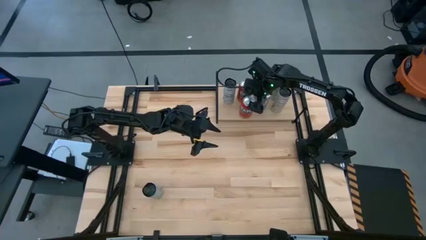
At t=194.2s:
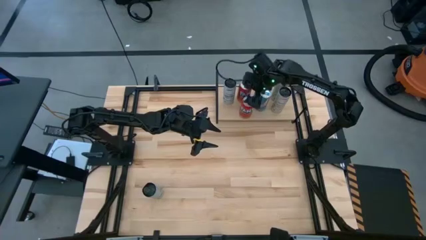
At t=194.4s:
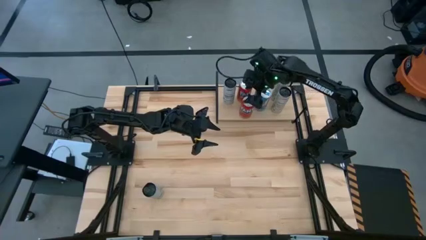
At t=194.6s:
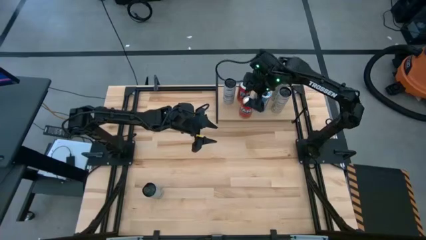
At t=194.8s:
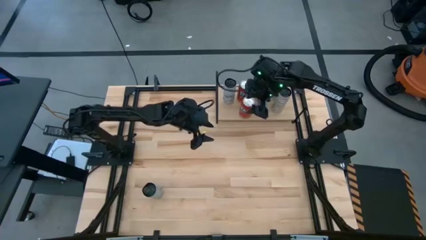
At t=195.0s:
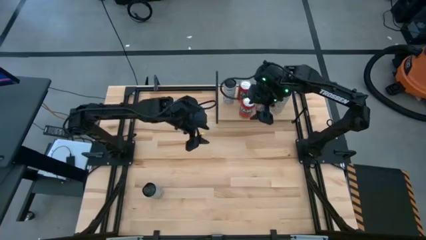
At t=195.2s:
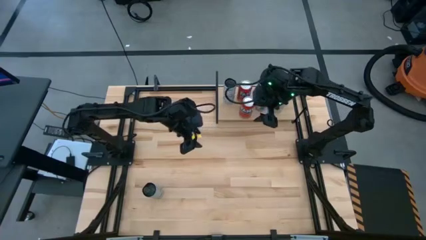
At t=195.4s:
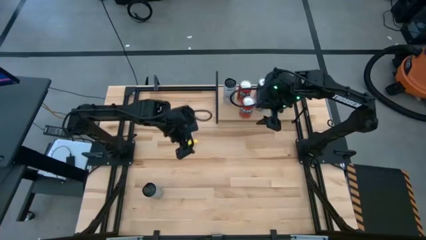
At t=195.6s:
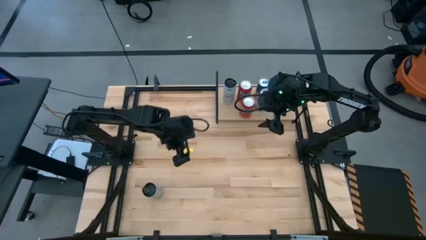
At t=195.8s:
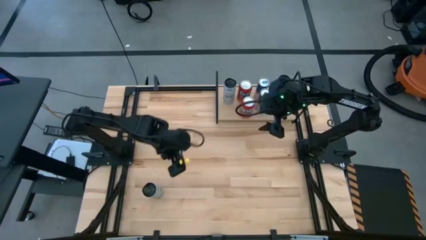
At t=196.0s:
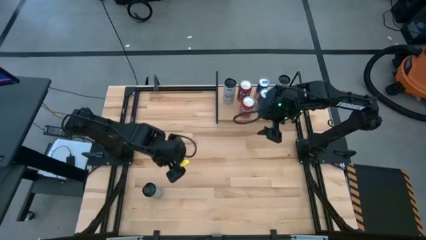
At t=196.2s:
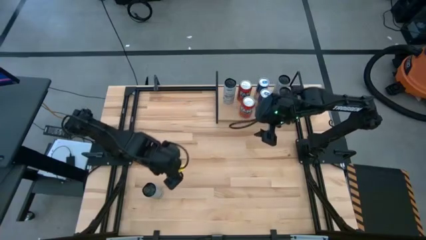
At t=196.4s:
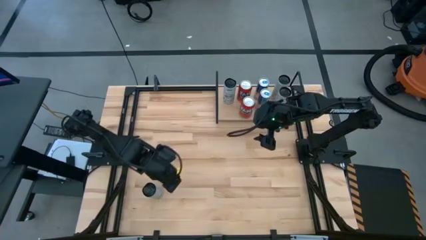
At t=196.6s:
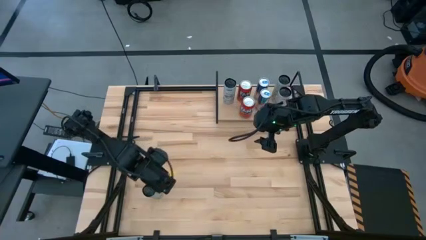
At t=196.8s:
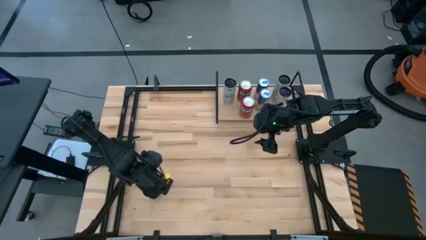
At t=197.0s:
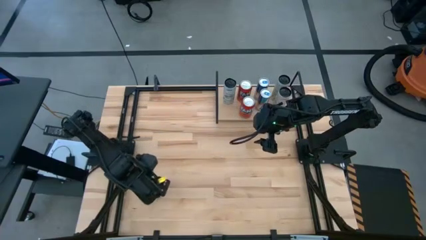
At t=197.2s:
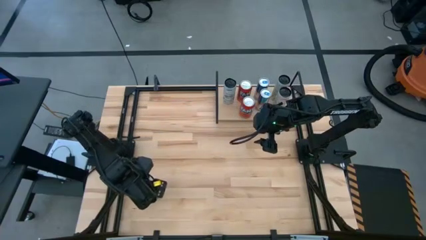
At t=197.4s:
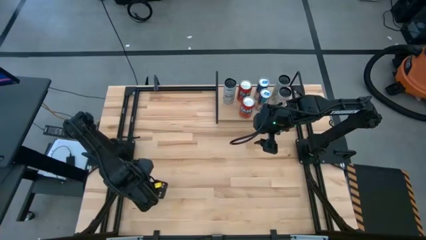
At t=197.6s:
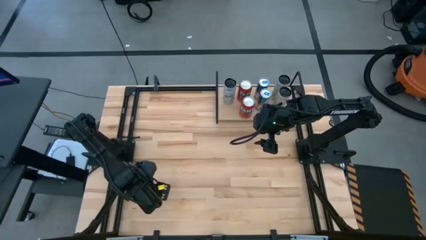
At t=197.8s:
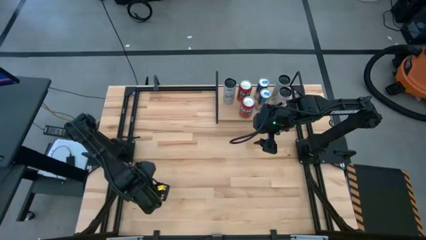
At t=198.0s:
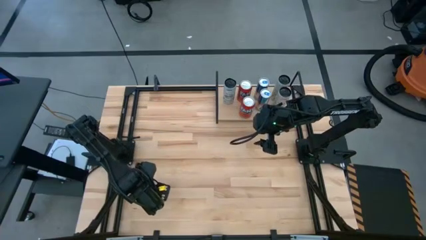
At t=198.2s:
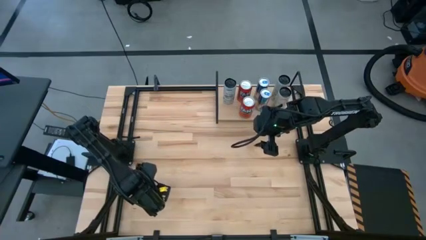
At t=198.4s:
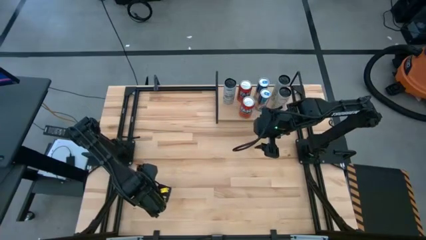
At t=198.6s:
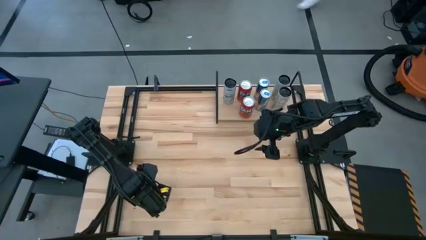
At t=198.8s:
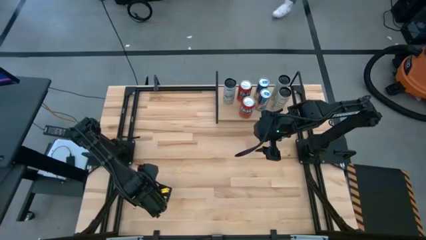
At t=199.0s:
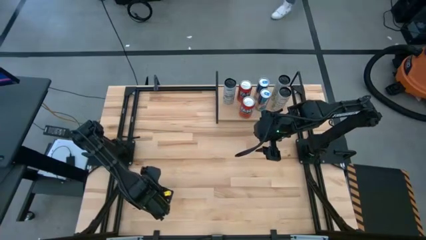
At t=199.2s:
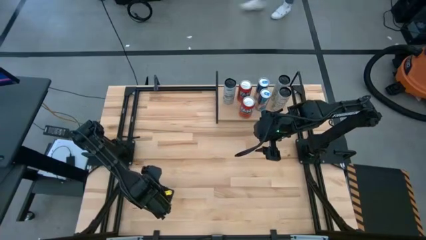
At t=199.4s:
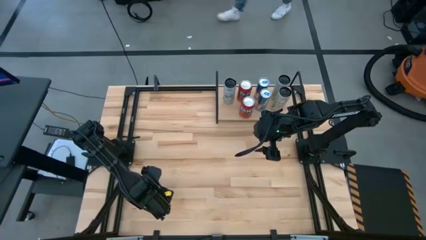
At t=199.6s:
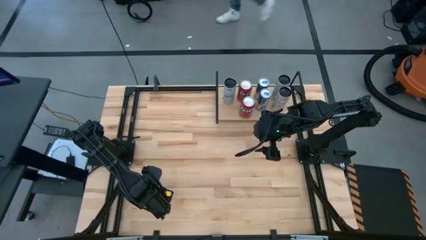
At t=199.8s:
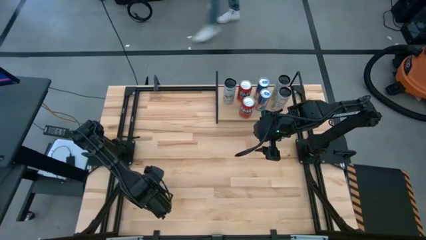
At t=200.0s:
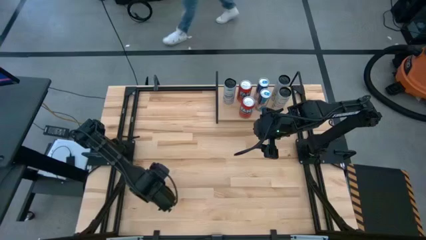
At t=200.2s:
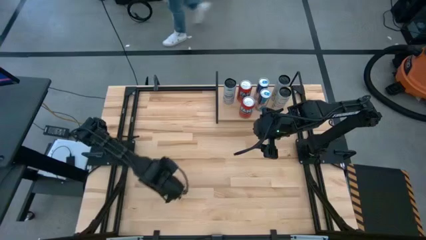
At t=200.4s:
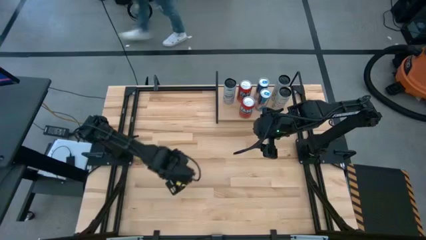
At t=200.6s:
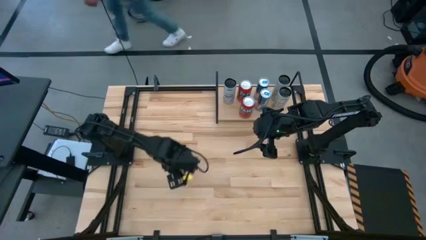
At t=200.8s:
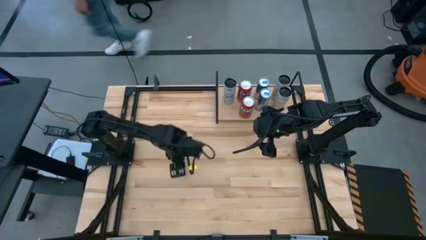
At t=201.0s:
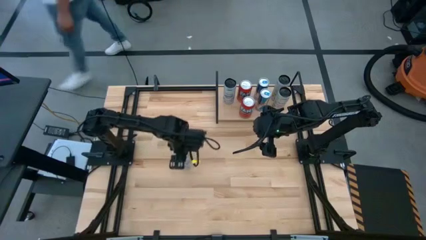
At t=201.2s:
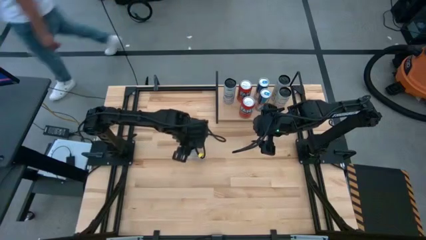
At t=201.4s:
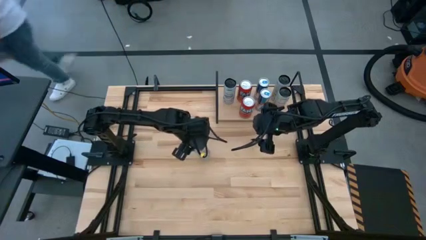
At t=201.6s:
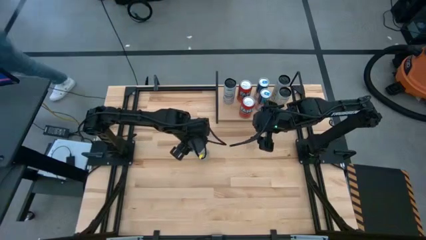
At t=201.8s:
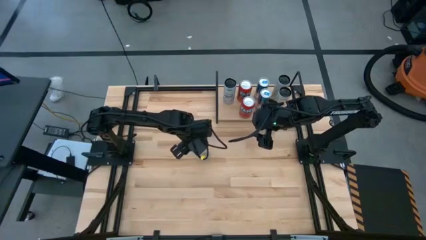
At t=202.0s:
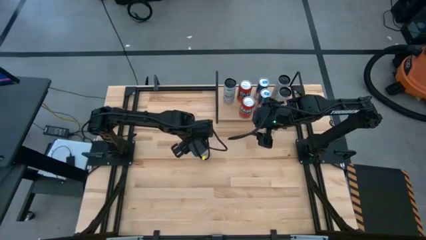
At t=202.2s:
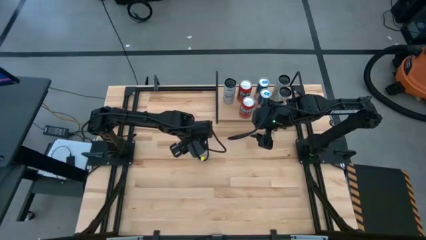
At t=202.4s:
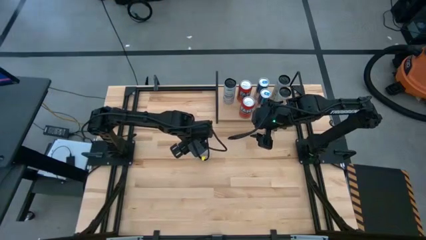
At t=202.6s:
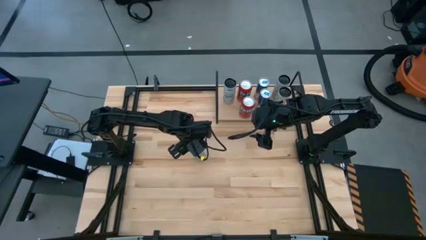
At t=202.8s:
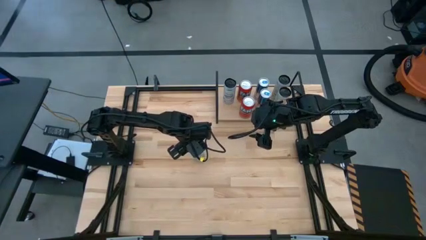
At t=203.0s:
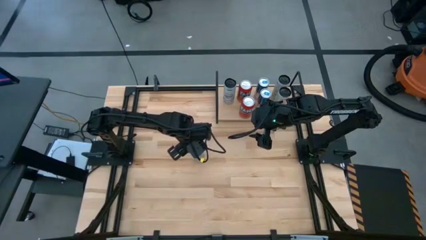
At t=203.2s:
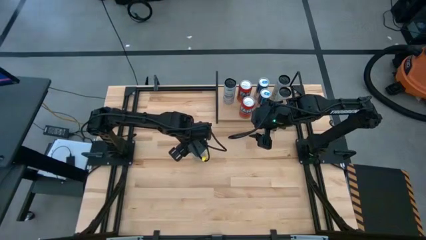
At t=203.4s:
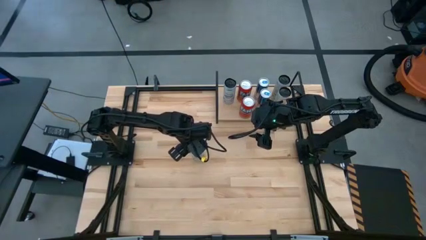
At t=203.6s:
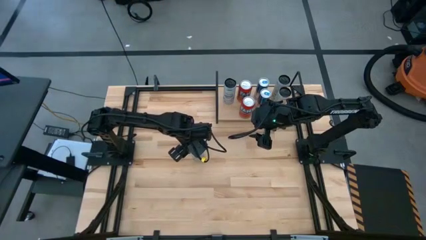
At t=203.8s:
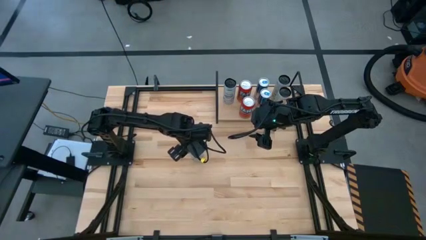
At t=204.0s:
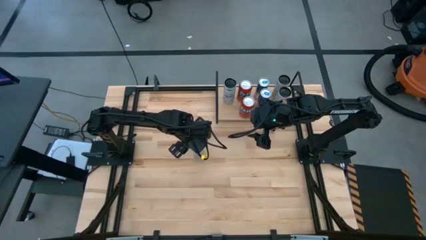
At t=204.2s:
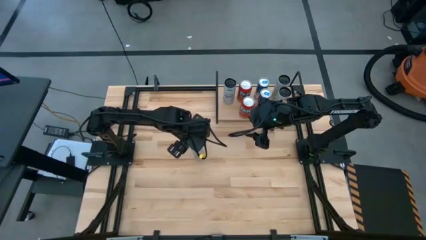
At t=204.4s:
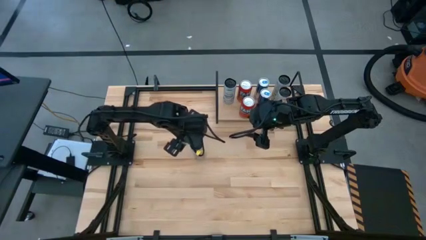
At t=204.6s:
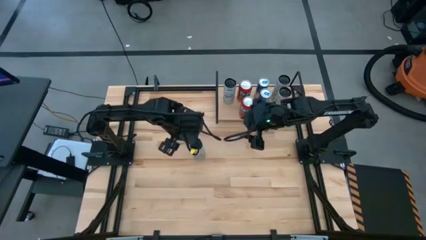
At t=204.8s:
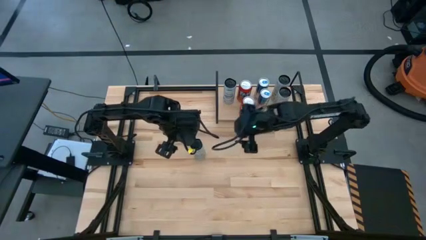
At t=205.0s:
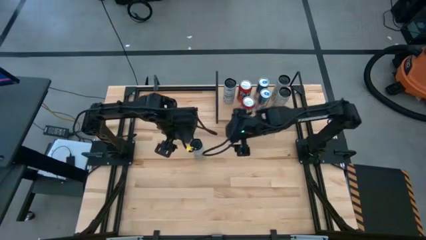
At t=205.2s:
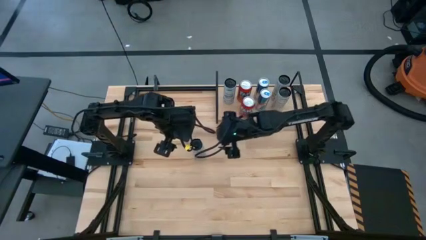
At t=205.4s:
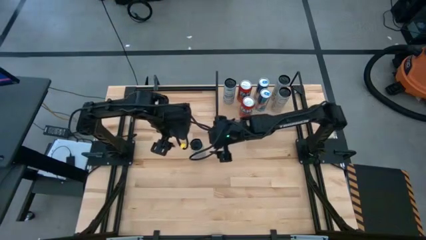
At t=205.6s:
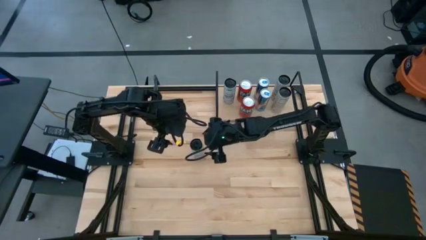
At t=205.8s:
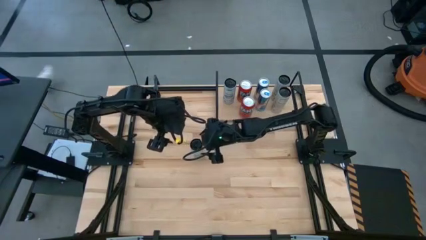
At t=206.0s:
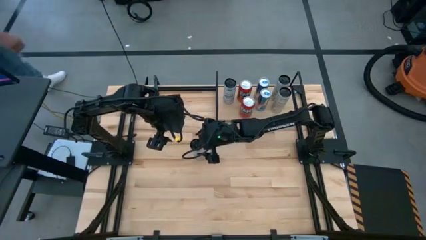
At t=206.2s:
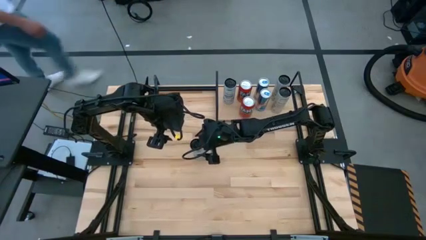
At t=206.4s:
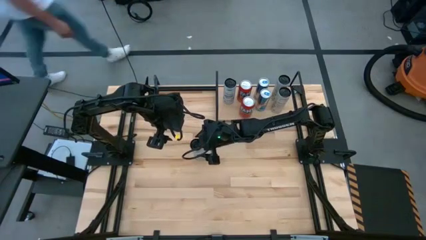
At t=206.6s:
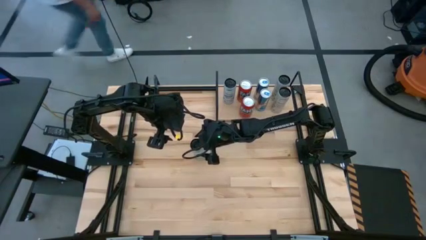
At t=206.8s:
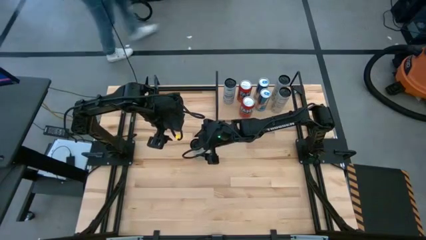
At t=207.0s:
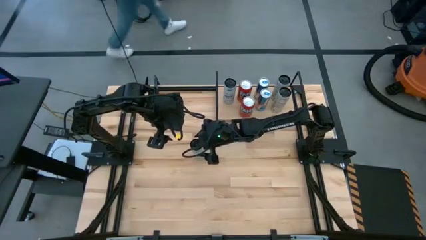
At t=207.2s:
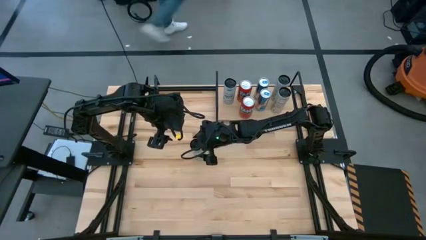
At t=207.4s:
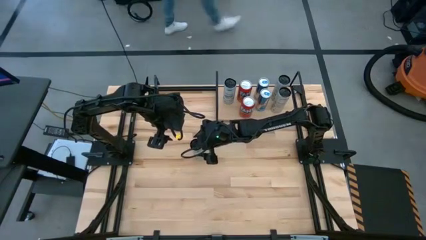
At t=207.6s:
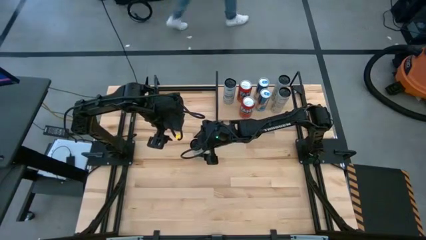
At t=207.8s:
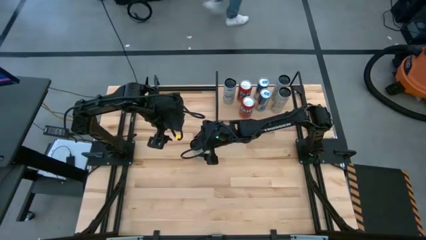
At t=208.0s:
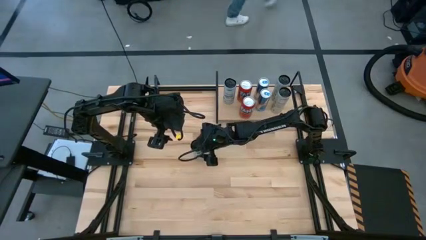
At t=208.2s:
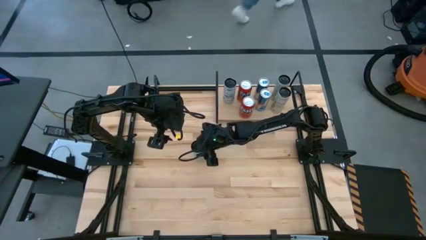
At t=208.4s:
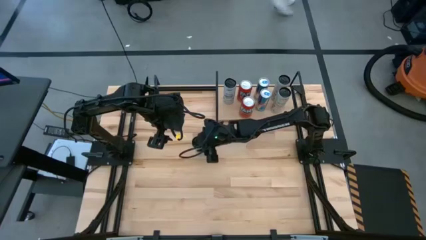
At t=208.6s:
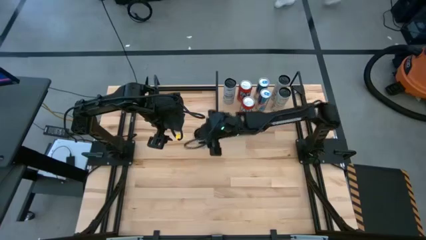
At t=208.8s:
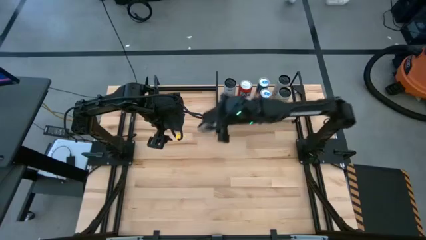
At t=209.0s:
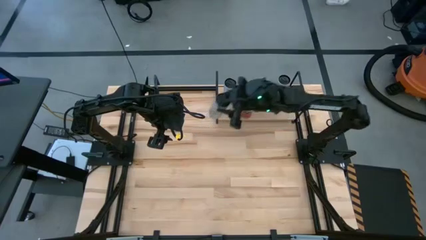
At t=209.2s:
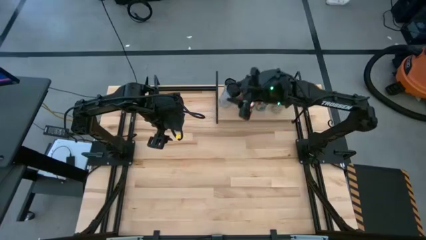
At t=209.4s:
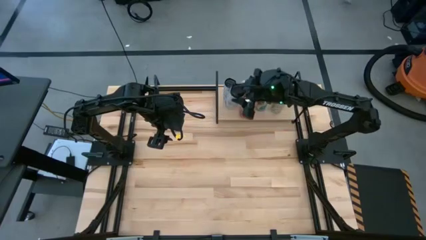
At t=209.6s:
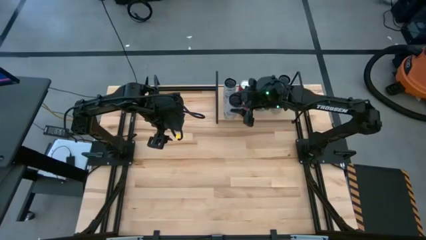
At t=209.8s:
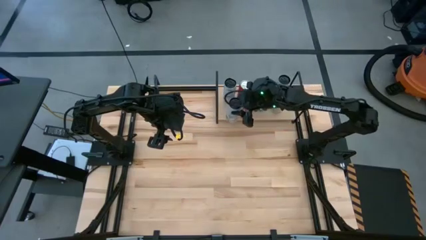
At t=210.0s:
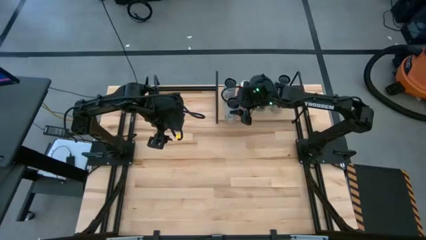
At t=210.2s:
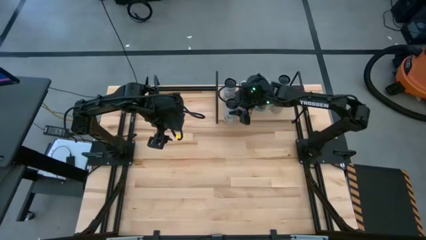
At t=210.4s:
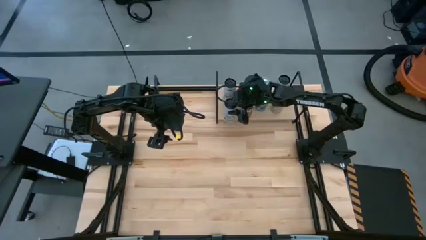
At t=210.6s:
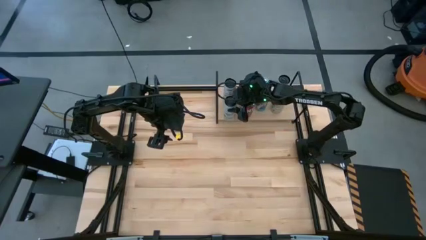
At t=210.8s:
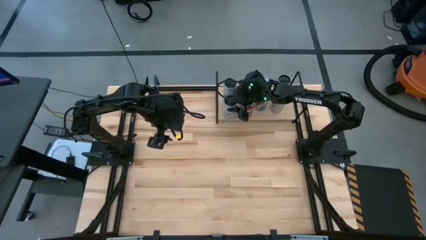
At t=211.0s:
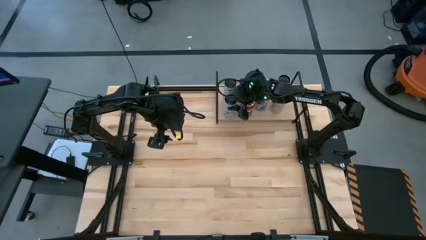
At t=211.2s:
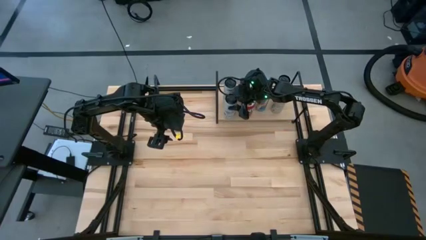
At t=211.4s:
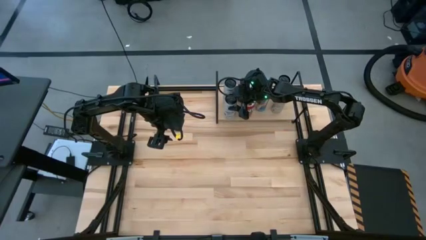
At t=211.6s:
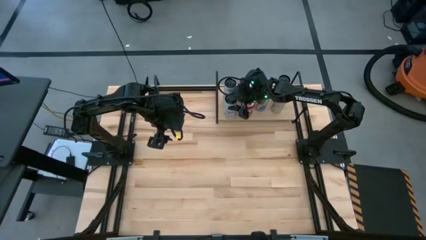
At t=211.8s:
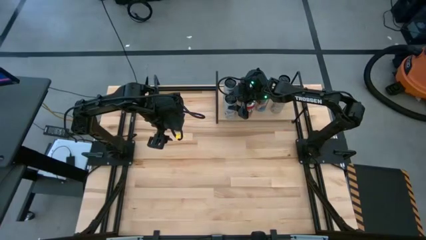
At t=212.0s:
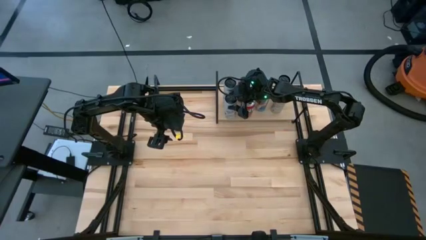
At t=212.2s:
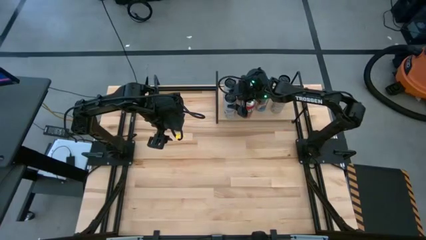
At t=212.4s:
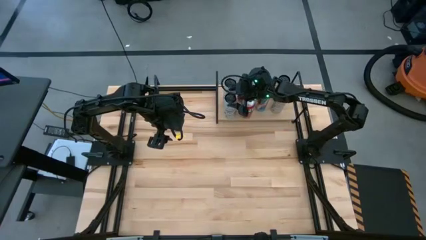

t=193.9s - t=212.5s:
Task: Place canned beverage on shelf
Put the white blue soda can on the shelf aligned with the other white blue soda can
